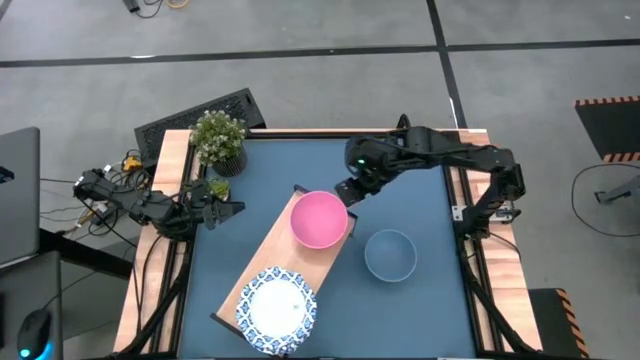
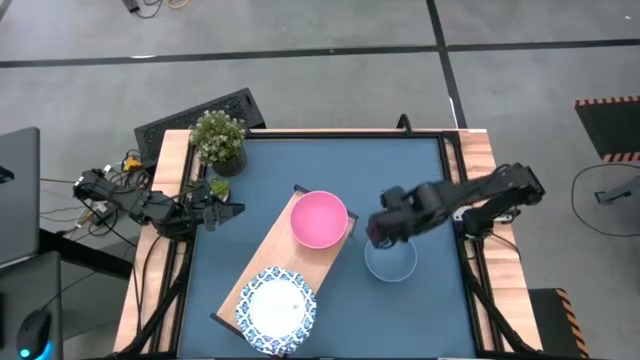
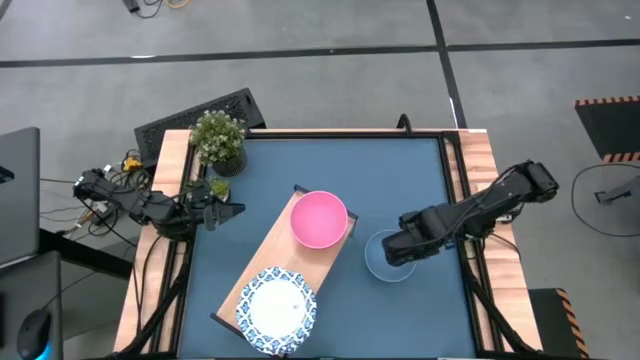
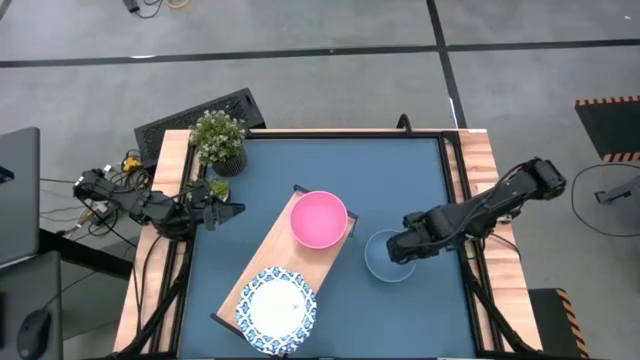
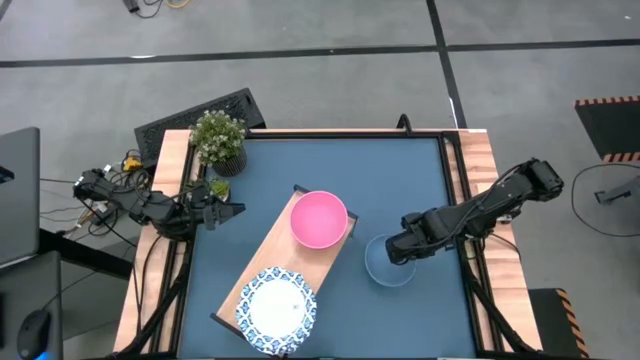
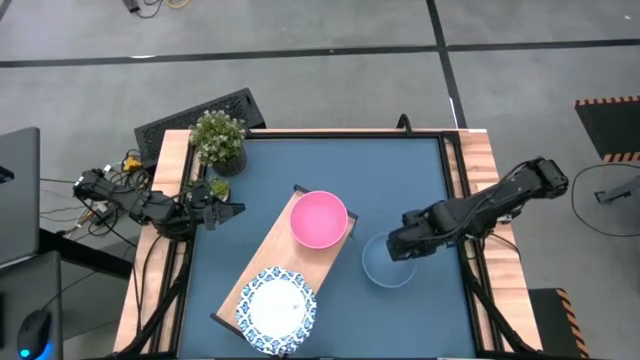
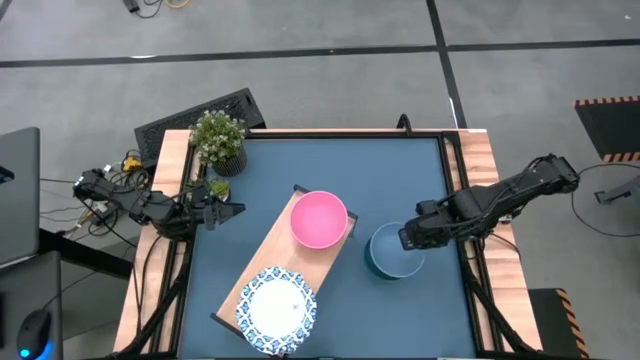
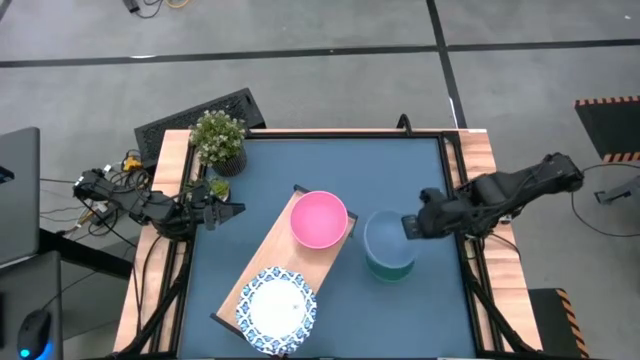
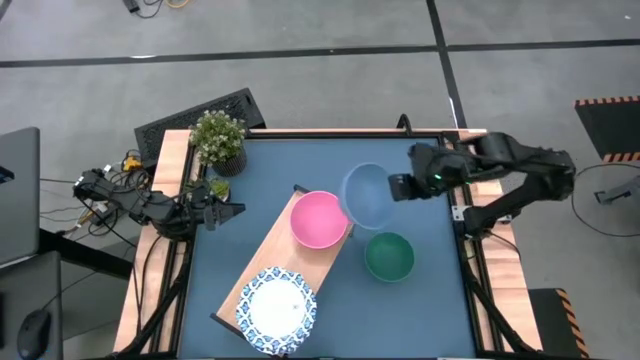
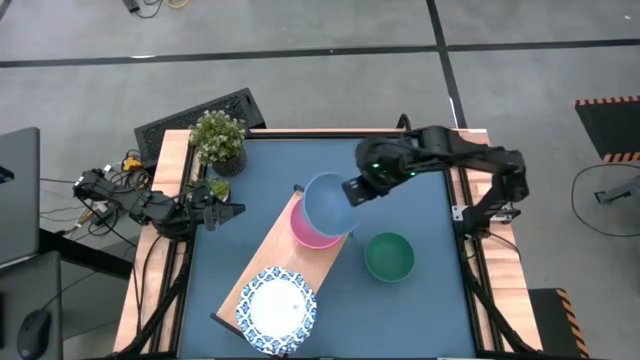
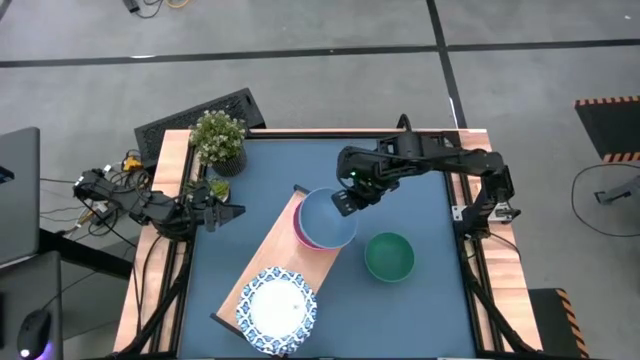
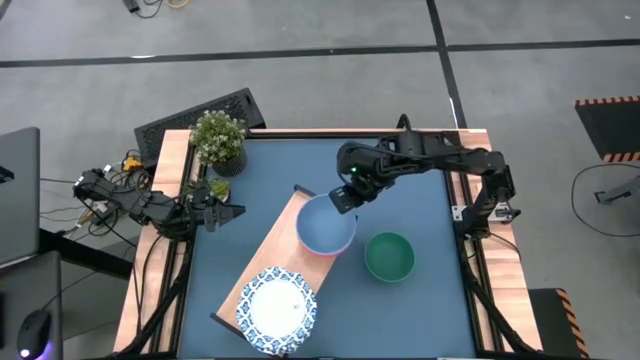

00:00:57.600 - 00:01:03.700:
Task: Place and stack bowls onto a shelf
Stack the blue bowl on top of the pink bowl on the shelf

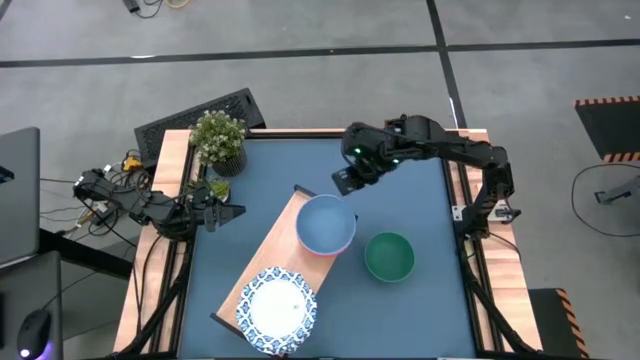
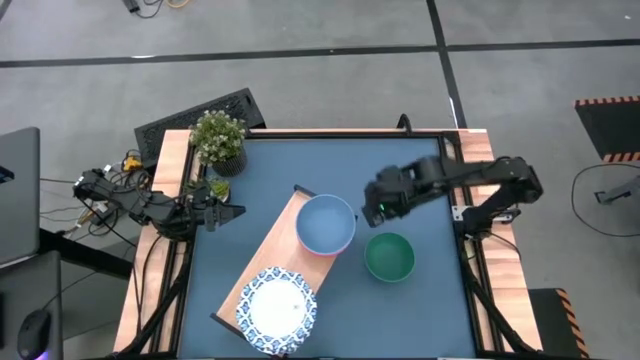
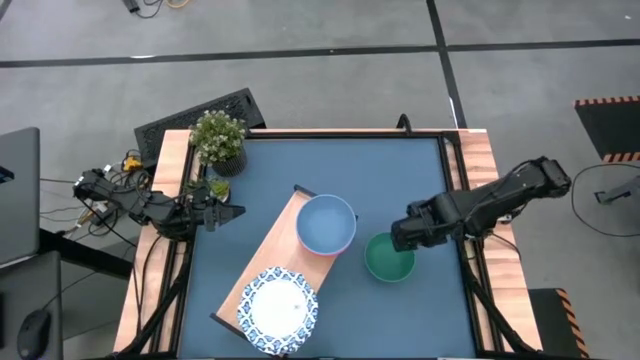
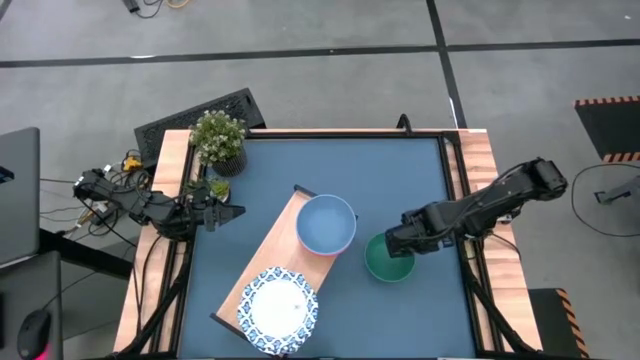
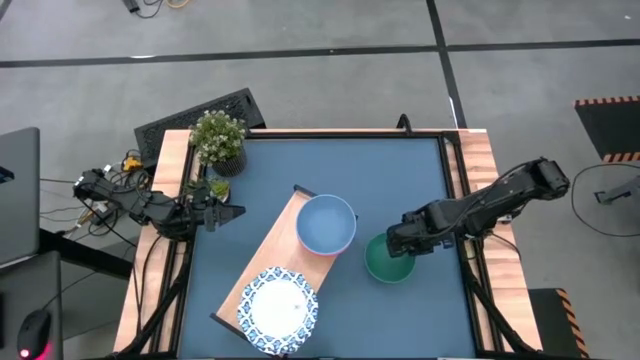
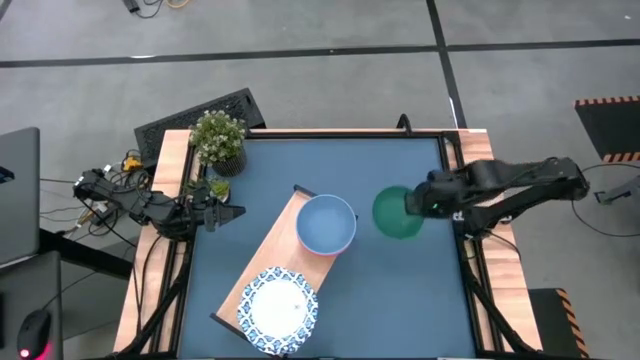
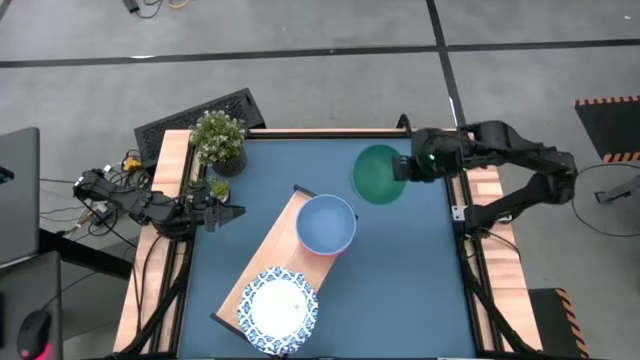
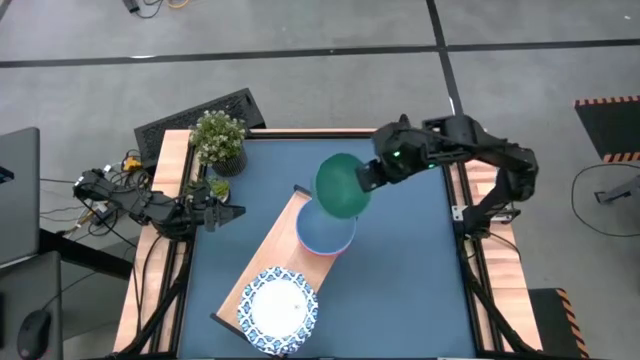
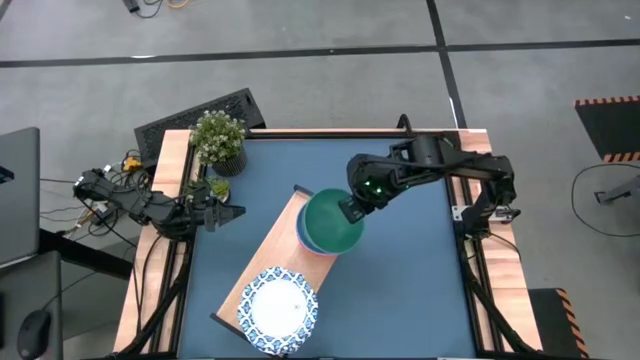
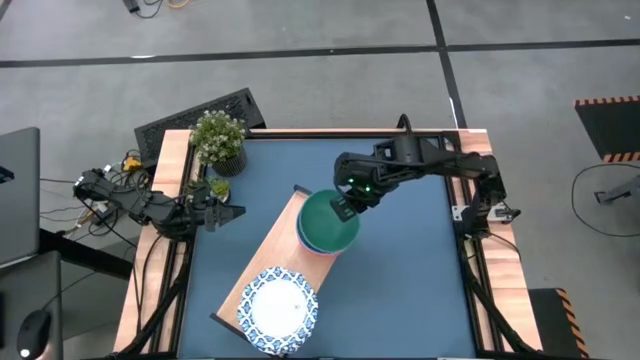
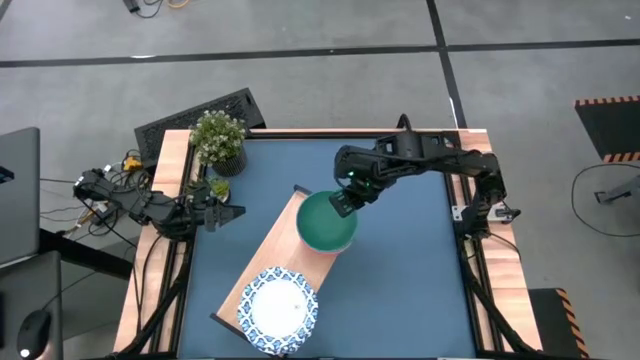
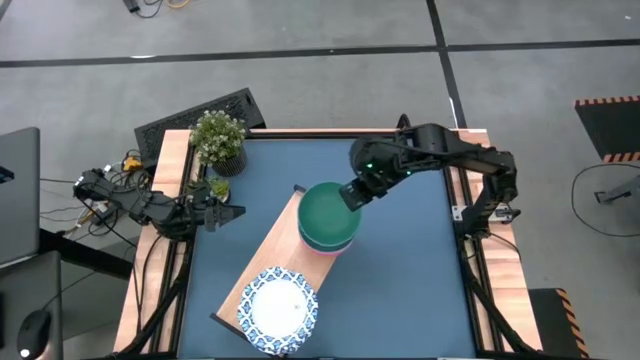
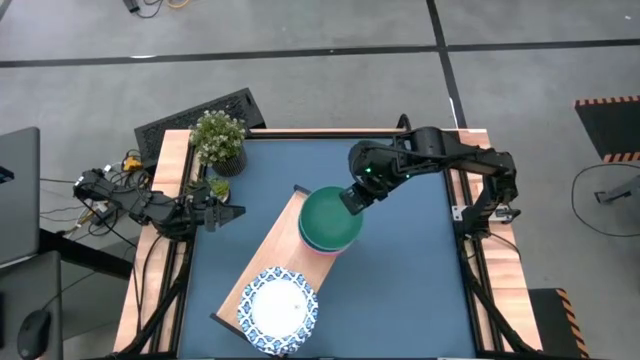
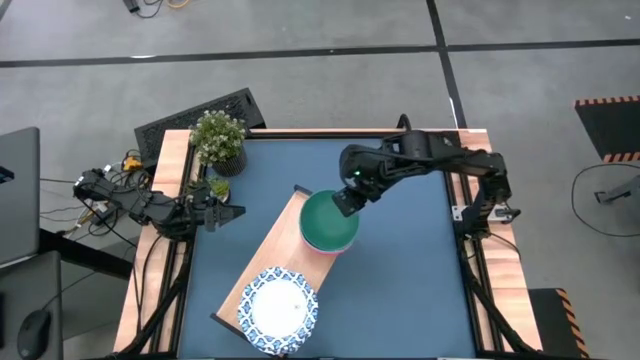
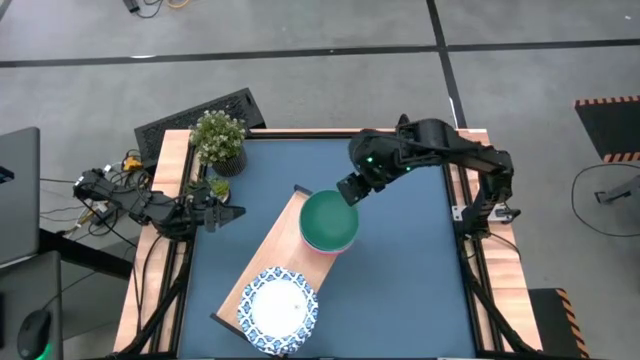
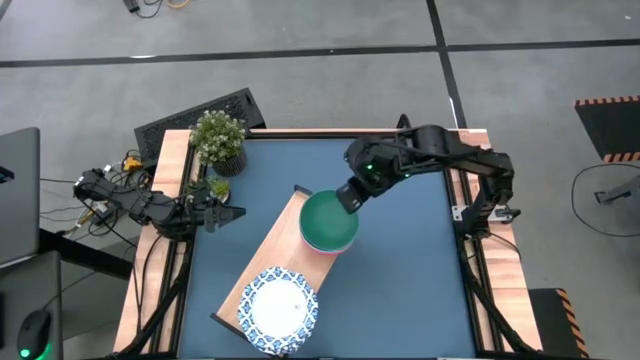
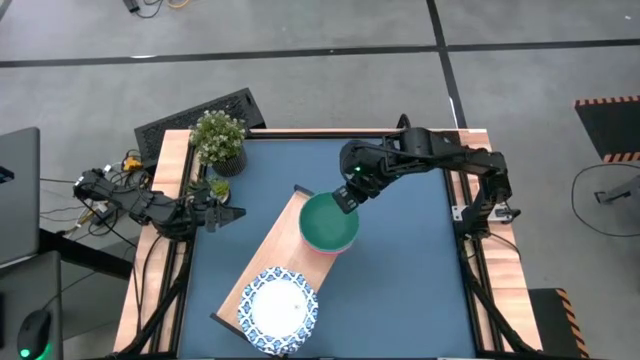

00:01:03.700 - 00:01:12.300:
Stack the green bowl on top of blue bowl on the shelf

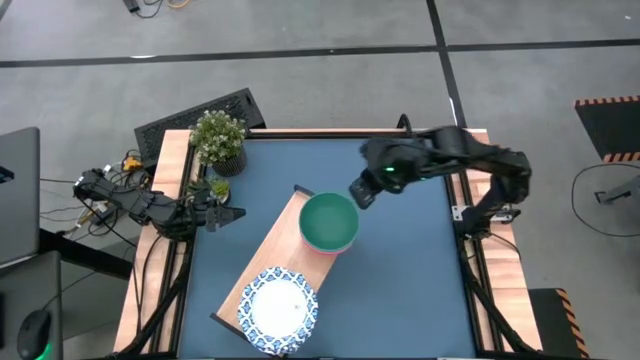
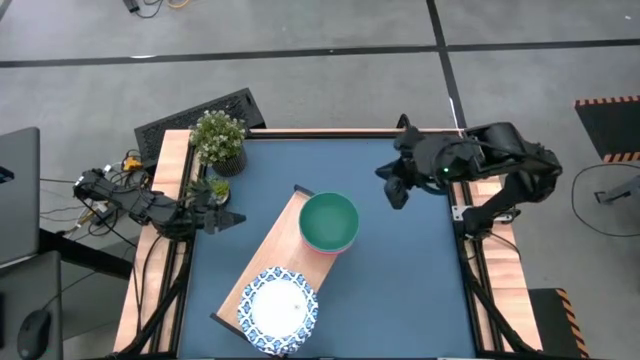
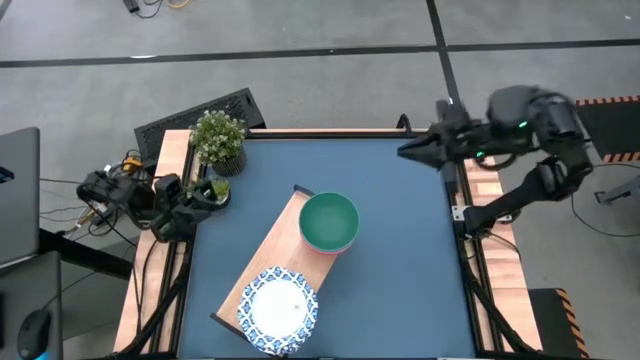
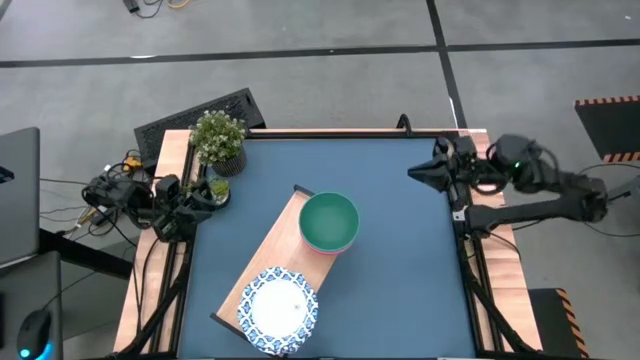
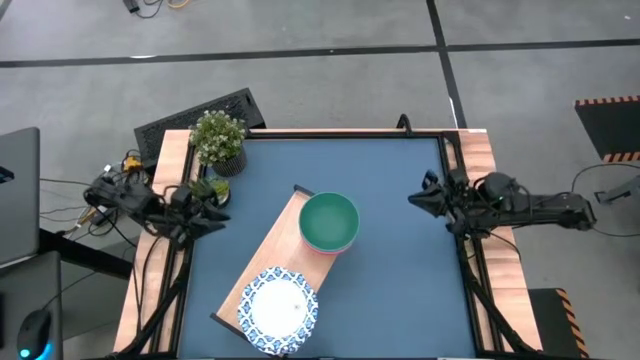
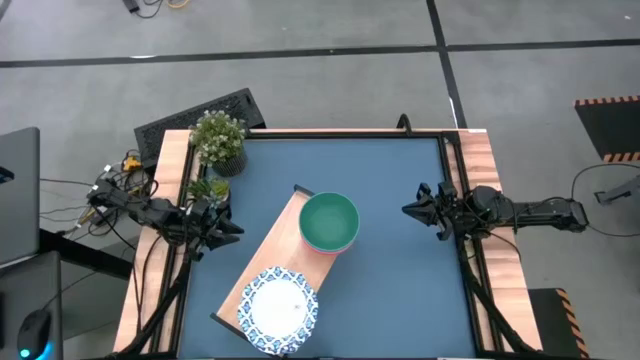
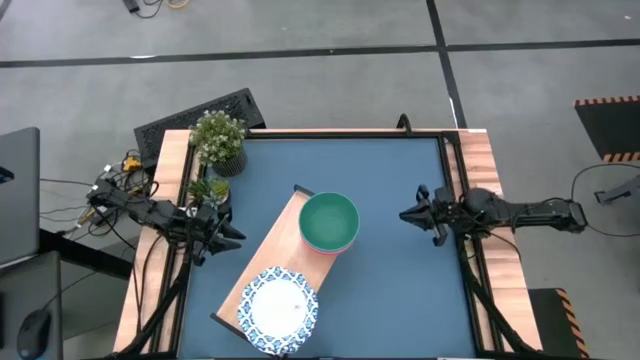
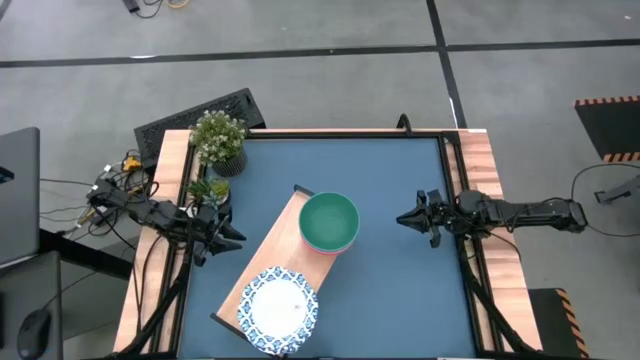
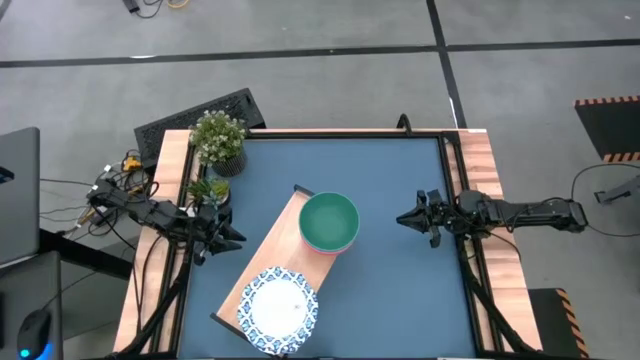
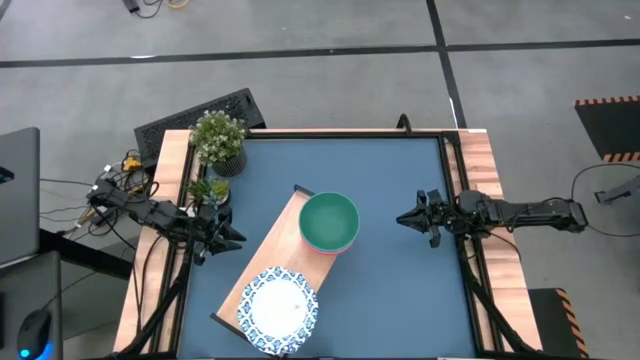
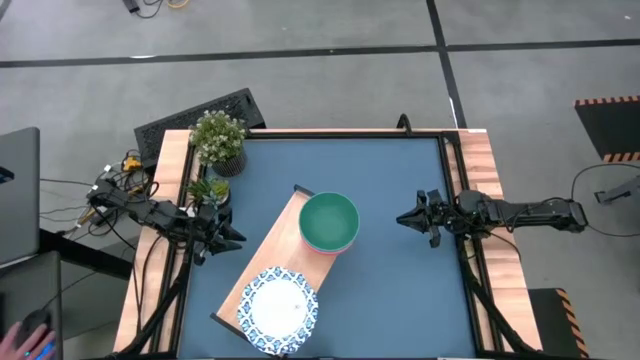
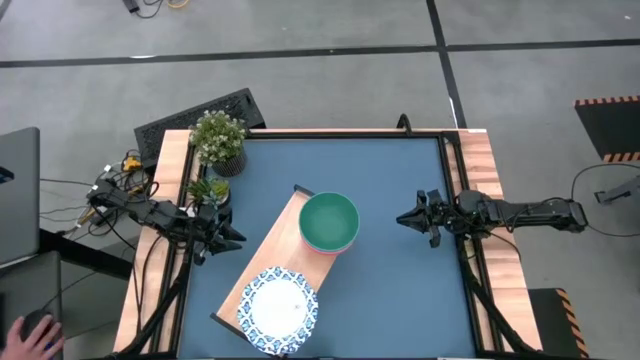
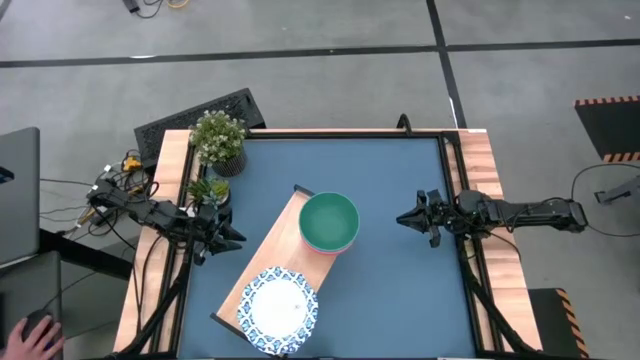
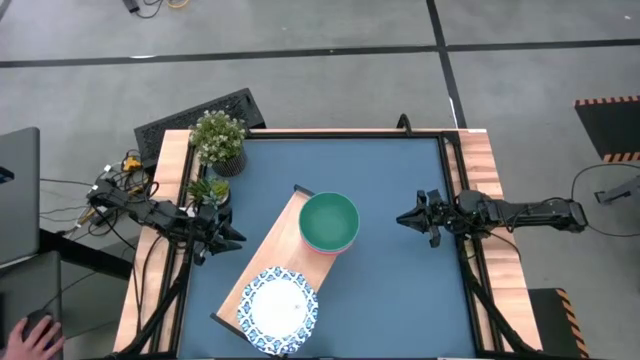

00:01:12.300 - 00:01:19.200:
Return to Home Position

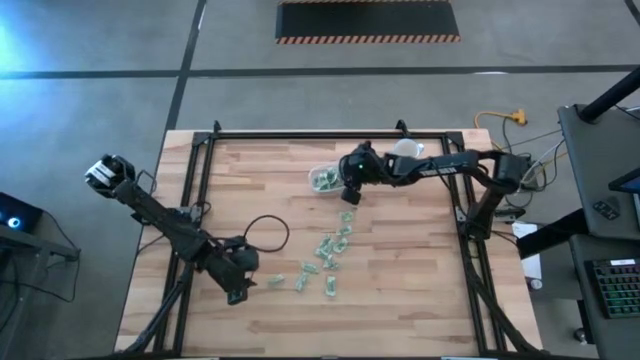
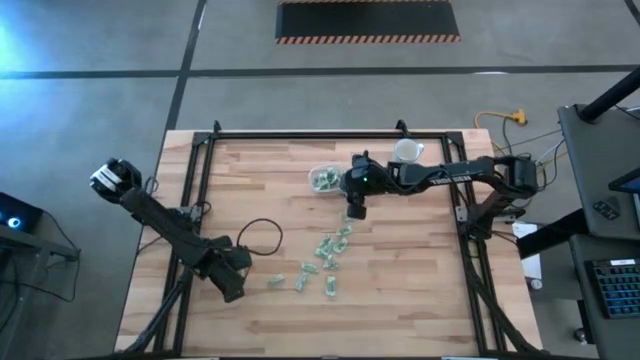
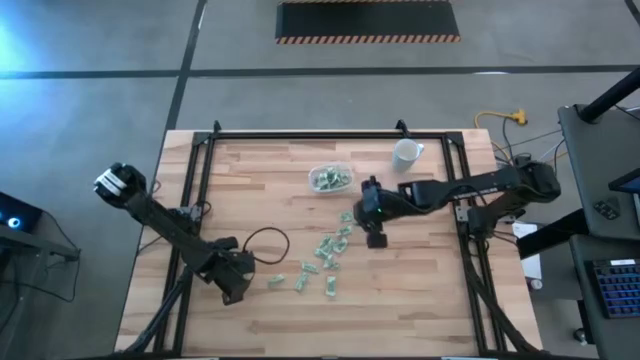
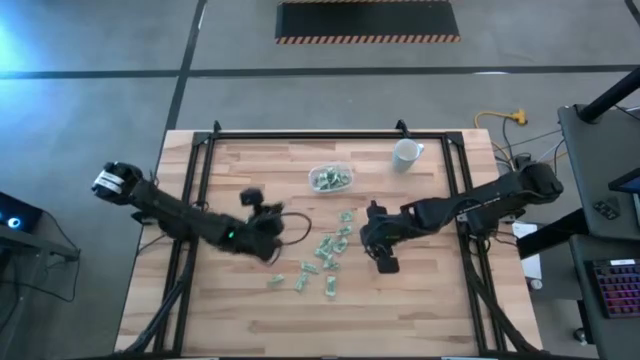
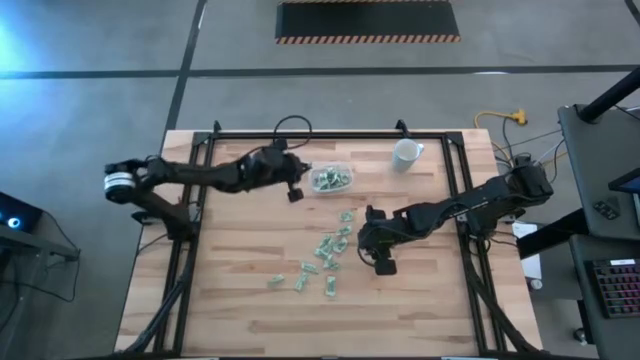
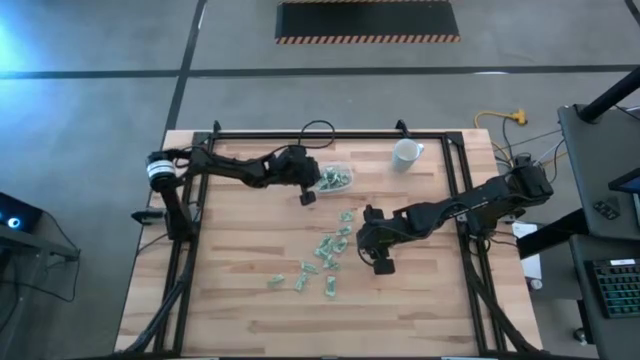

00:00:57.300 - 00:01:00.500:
Task: Pick and place Stevia / Truvia into bins
Put the stevia packet into the transparent container
